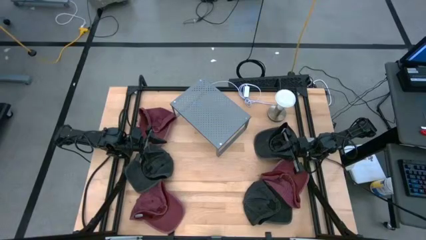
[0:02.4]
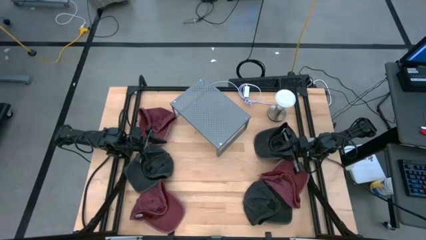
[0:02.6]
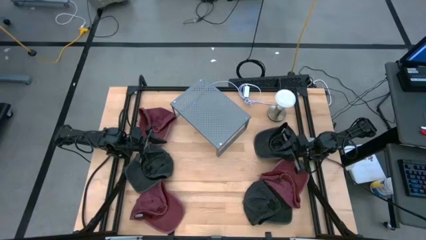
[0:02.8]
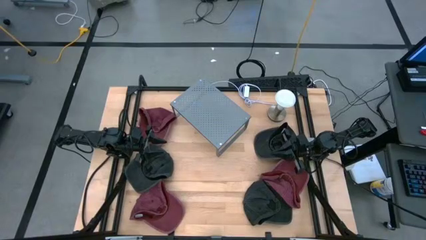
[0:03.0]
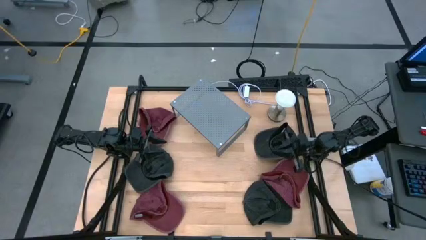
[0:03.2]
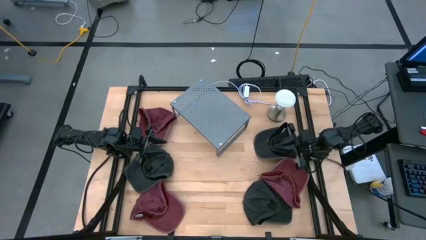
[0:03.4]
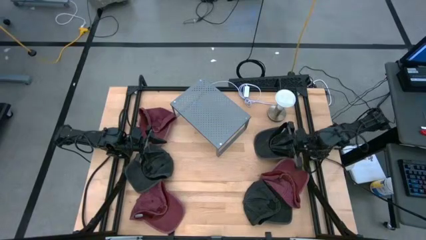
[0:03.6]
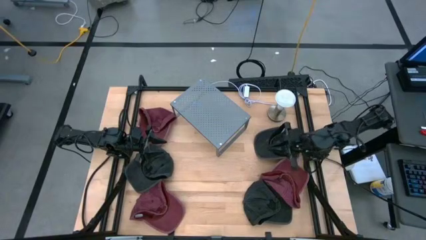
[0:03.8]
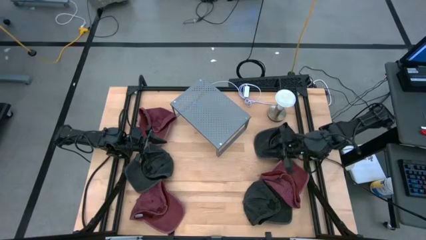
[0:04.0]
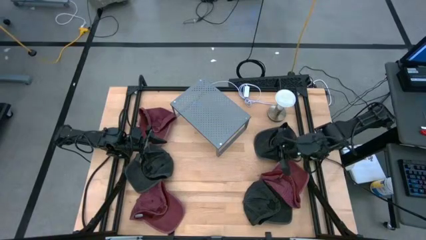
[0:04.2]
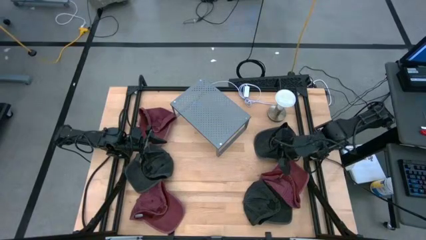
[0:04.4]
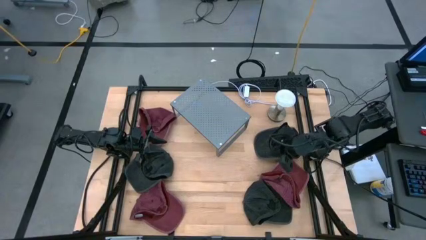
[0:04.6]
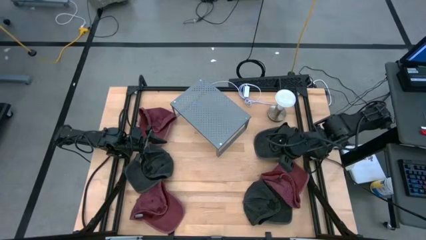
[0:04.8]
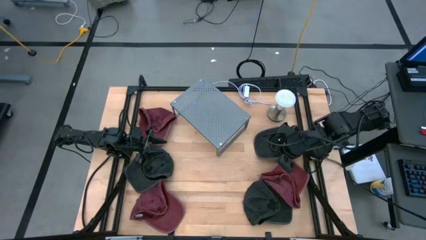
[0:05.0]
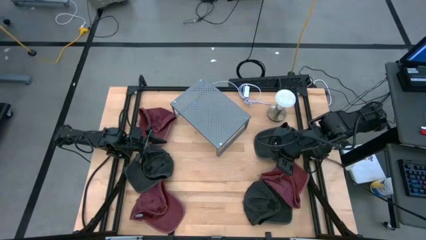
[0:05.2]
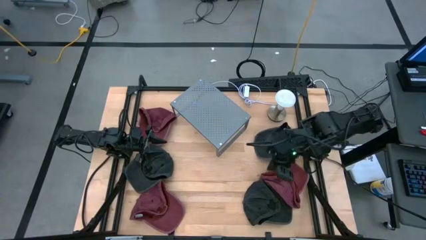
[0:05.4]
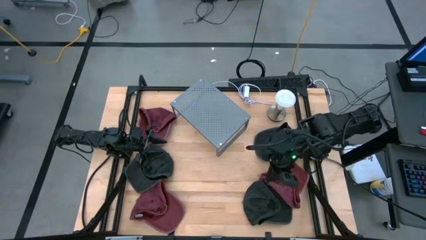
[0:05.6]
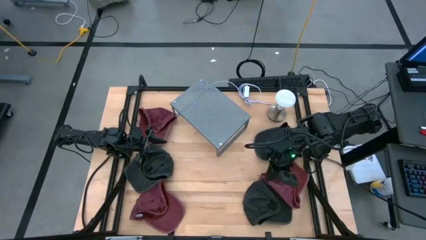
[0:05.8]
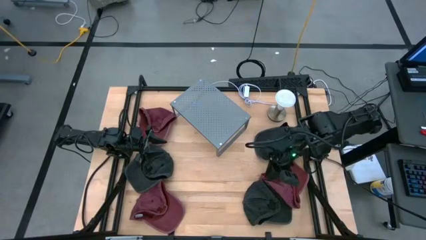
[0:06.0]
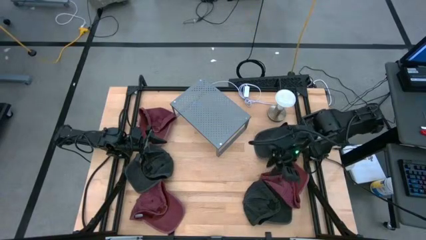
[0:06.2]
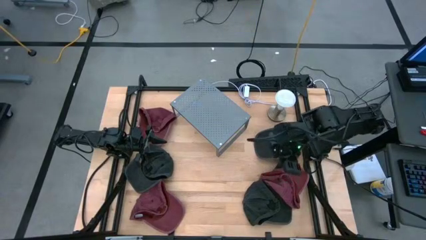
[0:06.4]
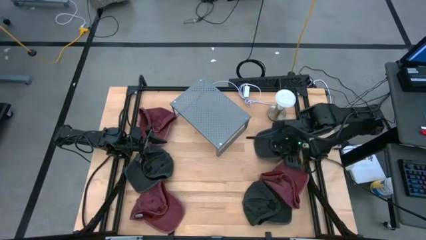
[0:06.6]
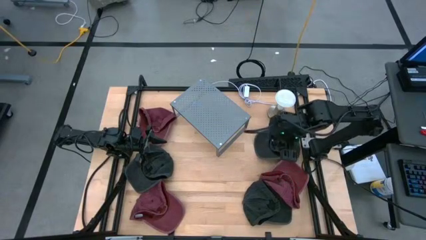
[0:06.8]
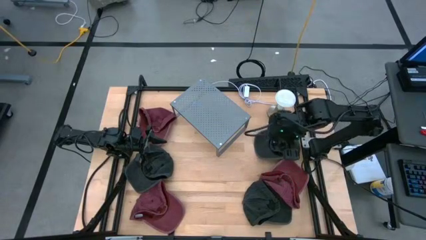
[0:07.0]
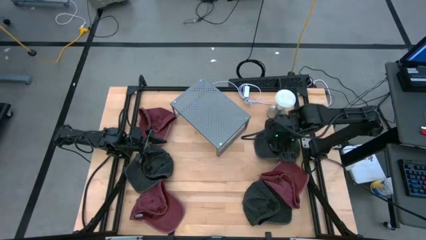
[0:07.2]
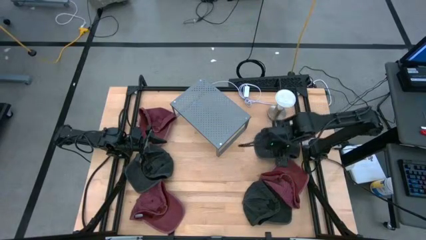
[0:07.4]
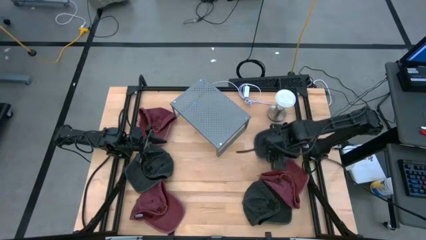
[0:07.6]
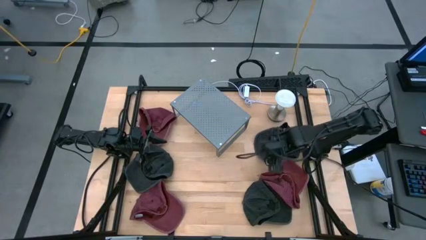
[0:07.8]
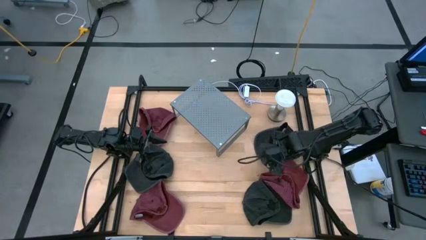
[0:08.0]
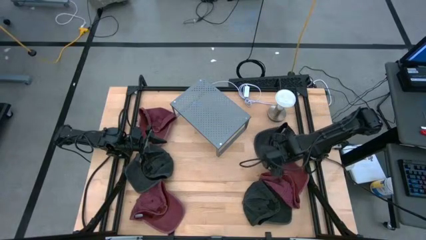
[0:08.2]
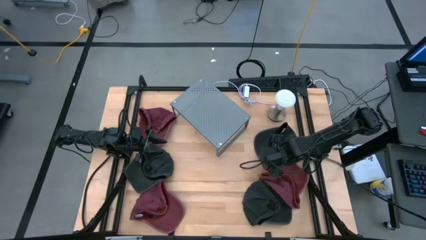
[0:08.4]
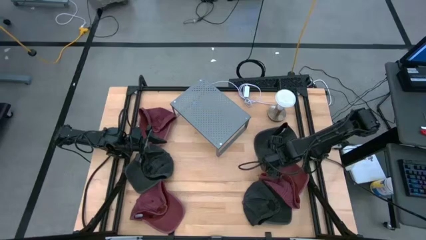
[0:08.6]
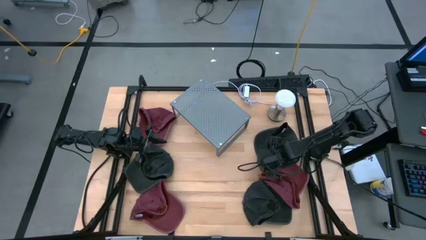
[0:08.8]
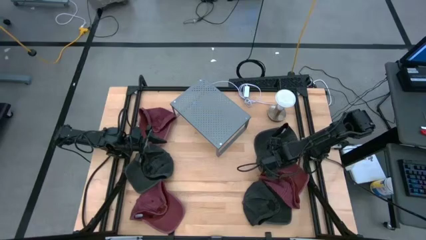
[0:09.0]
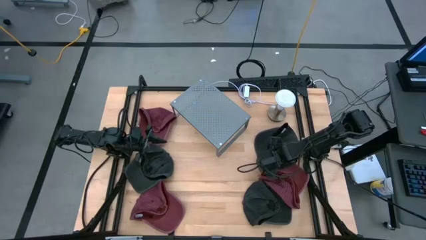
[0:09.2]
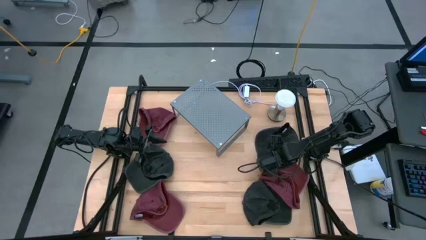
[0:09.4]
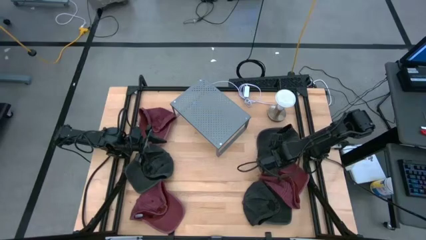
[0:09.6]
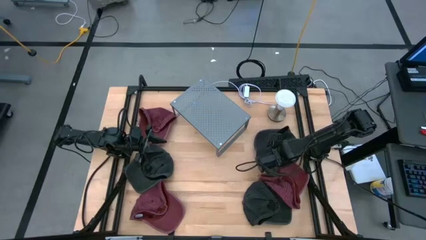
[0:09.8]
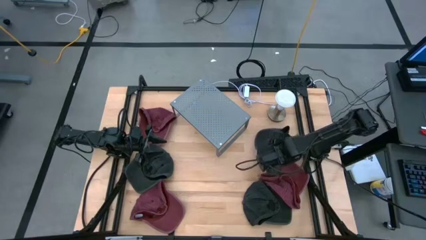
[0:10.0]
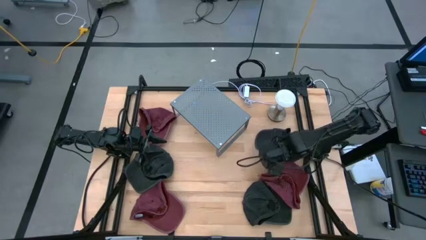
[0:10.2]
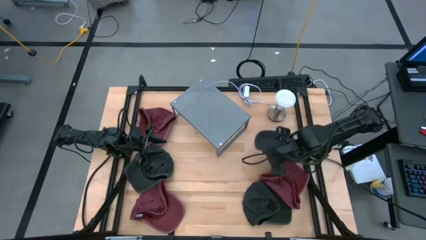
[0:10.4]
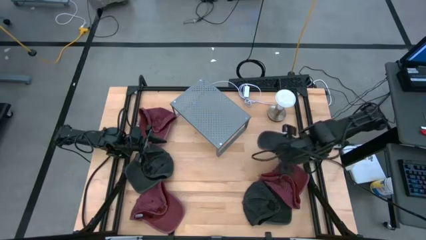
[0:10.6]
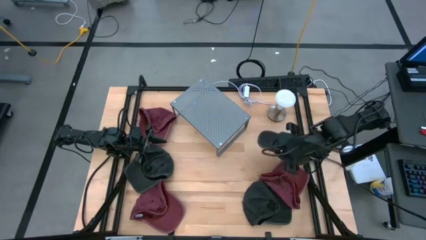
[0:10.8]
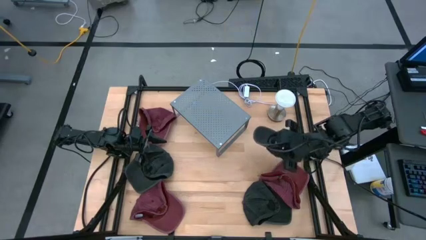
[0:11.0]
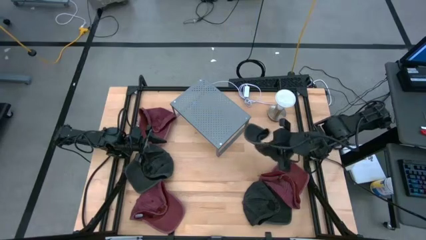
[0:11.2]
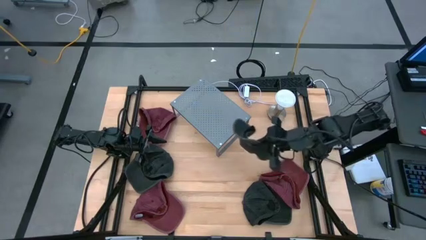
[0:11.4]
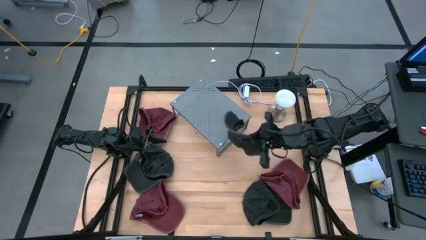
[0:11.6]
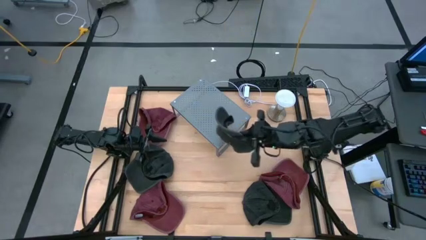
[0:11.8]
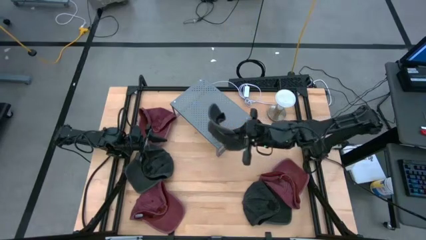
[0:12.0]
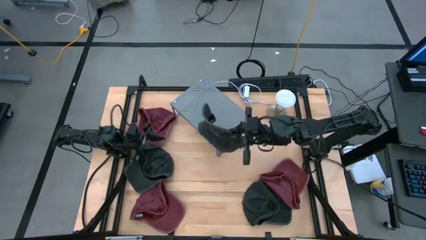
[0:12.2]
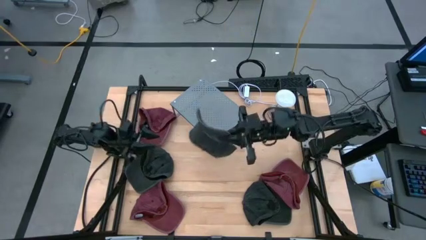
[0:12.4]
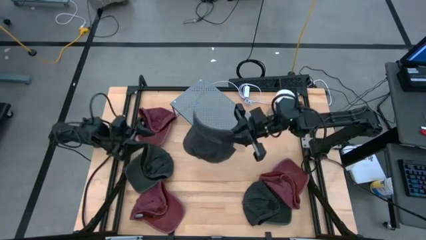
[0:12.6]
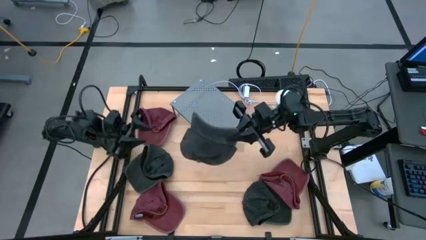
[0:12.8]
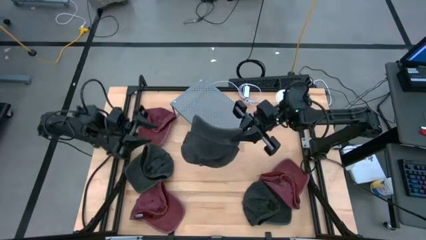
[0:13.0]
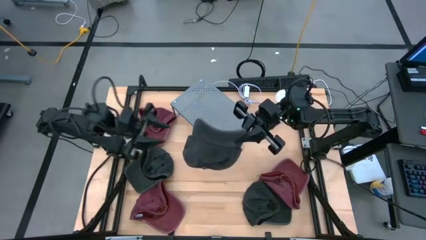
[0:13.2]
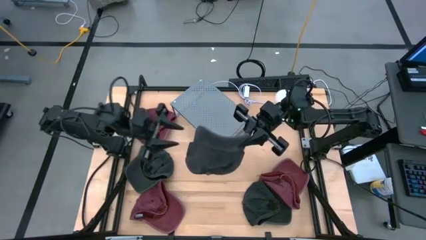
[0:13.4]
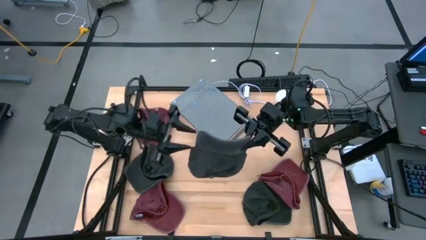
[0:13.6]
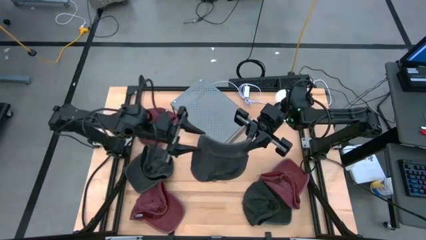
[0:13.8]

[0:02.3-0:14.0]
Task: Pick & Place hat
Put the top black cap on the shelf
